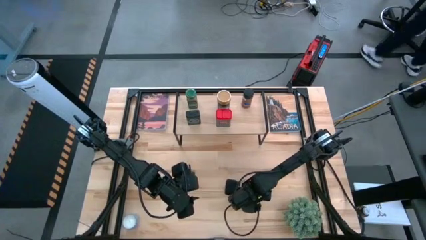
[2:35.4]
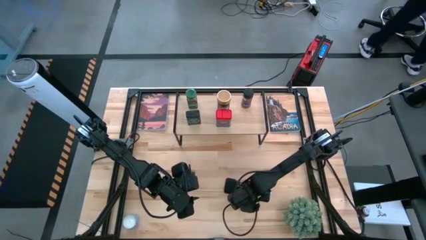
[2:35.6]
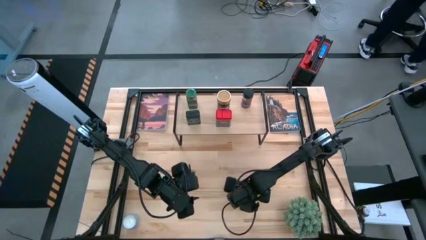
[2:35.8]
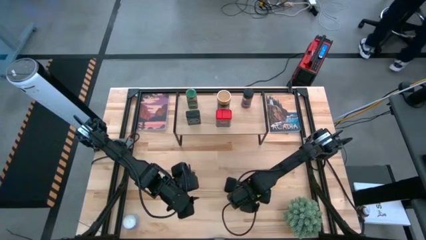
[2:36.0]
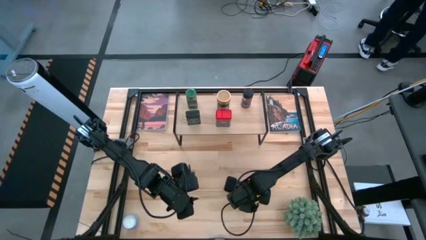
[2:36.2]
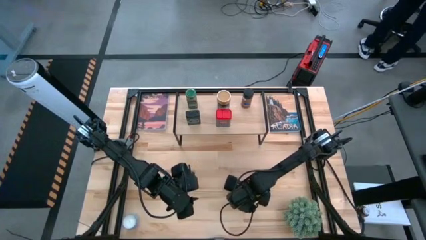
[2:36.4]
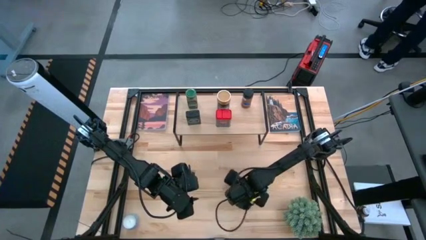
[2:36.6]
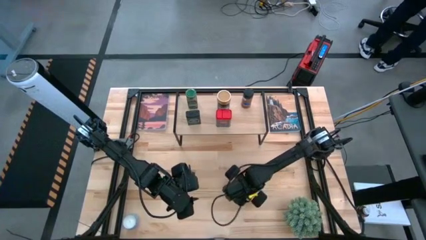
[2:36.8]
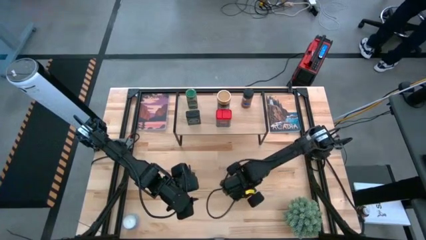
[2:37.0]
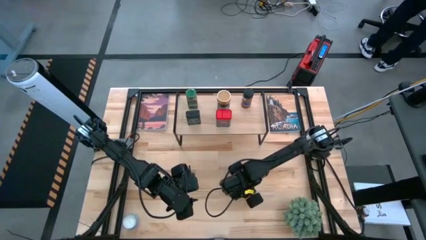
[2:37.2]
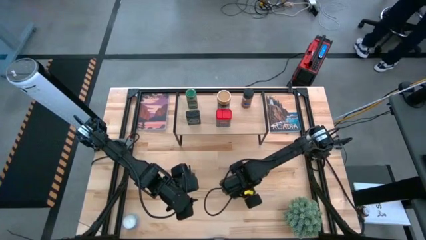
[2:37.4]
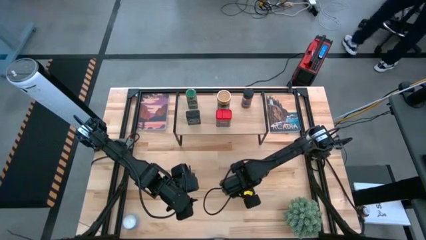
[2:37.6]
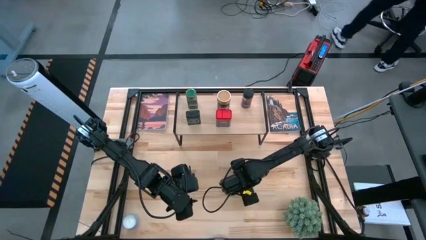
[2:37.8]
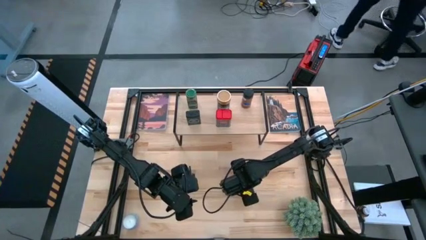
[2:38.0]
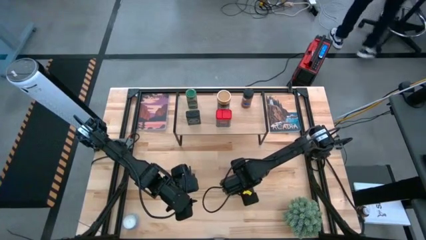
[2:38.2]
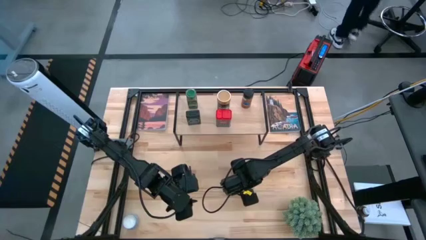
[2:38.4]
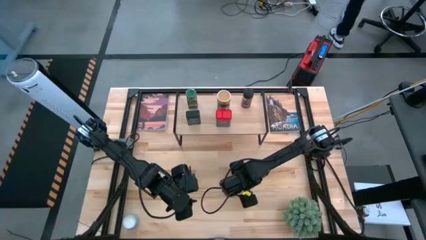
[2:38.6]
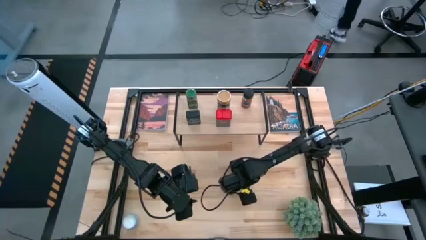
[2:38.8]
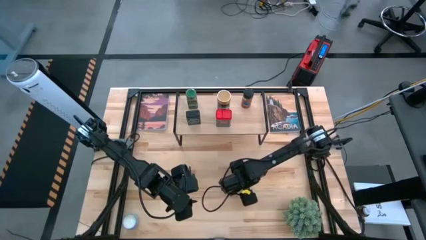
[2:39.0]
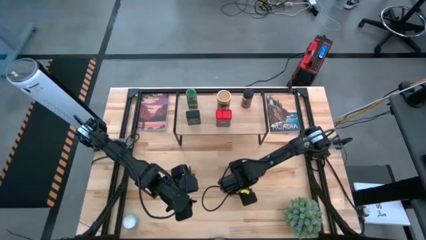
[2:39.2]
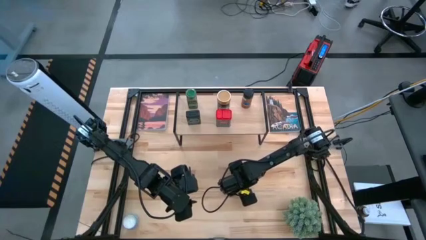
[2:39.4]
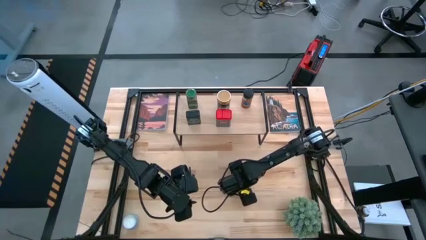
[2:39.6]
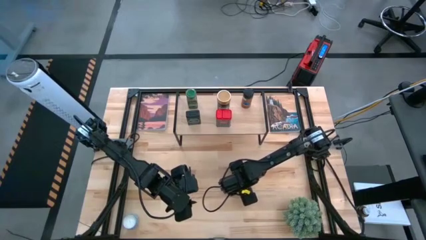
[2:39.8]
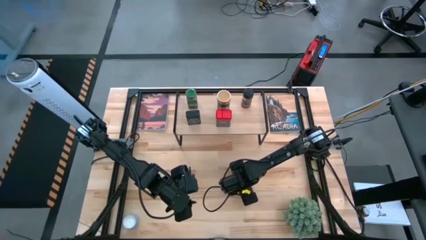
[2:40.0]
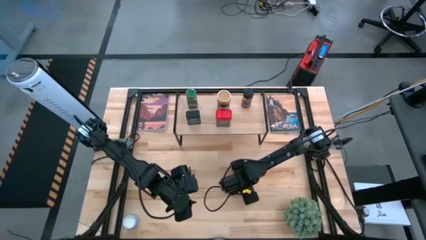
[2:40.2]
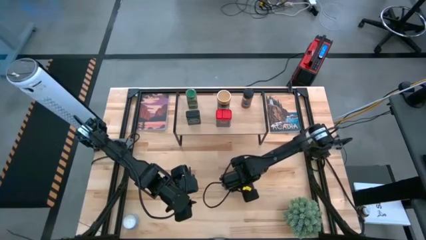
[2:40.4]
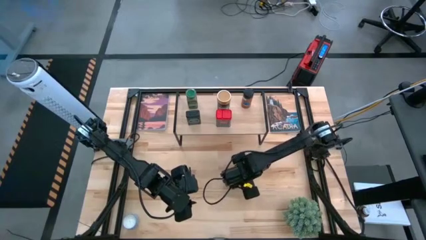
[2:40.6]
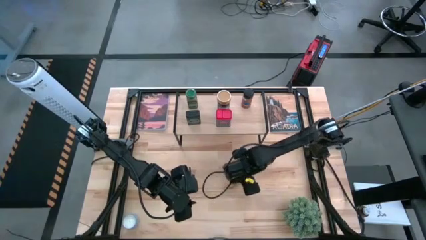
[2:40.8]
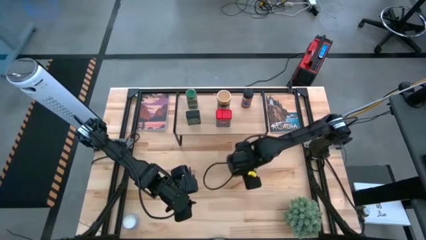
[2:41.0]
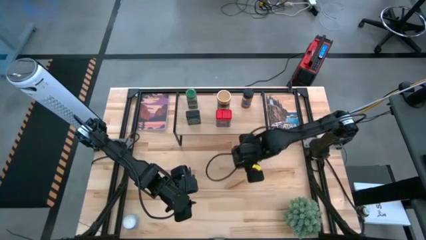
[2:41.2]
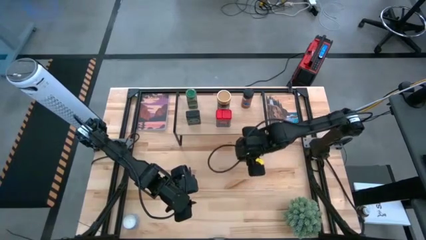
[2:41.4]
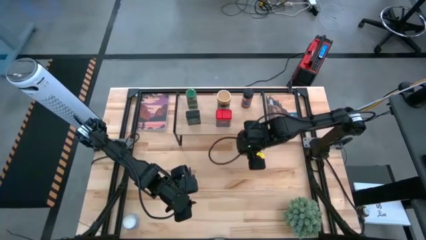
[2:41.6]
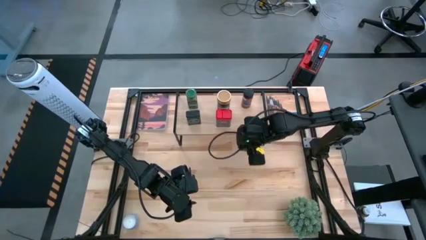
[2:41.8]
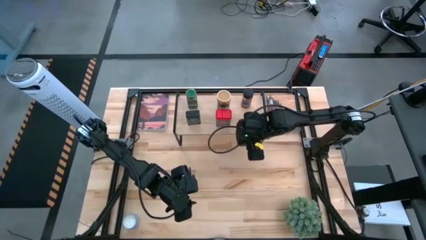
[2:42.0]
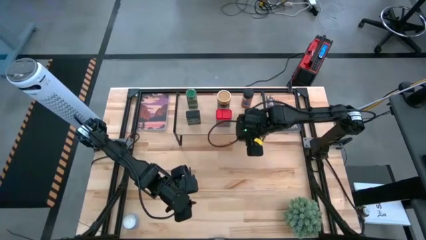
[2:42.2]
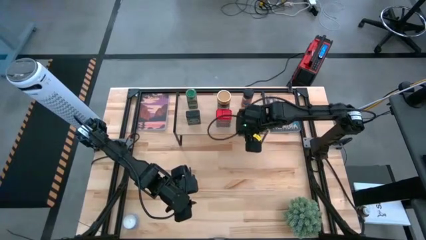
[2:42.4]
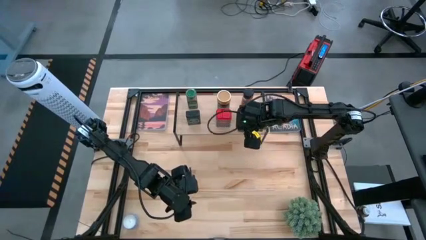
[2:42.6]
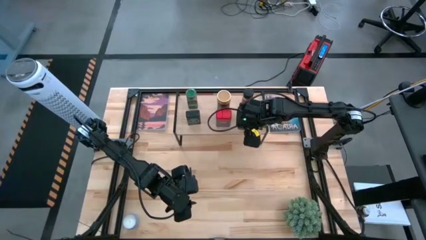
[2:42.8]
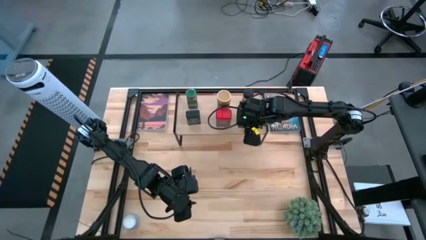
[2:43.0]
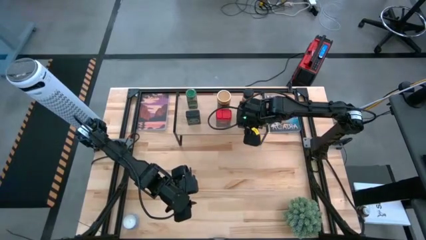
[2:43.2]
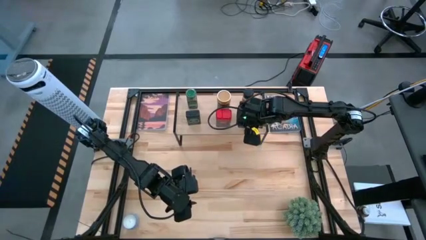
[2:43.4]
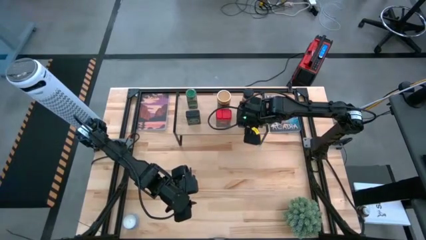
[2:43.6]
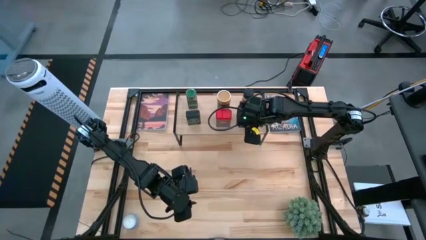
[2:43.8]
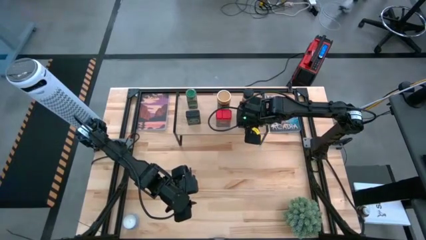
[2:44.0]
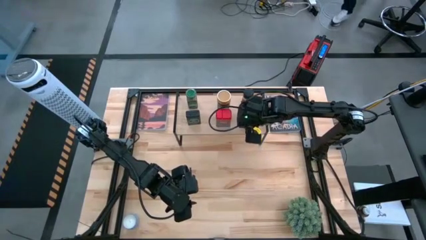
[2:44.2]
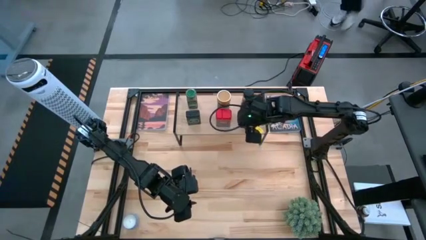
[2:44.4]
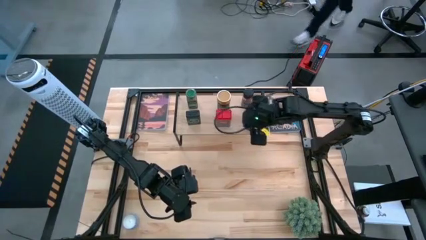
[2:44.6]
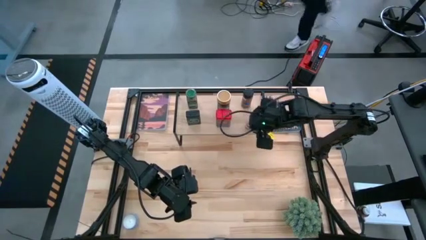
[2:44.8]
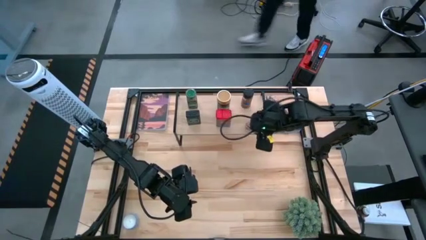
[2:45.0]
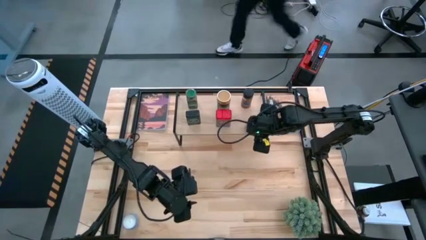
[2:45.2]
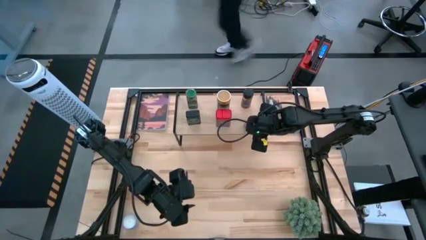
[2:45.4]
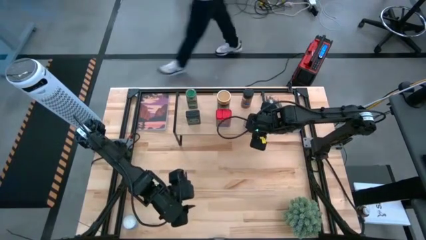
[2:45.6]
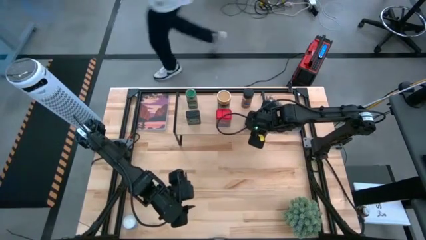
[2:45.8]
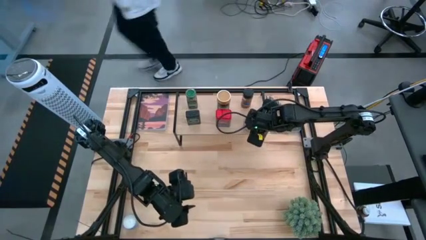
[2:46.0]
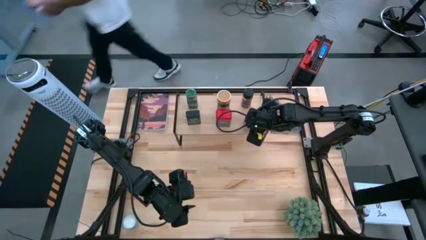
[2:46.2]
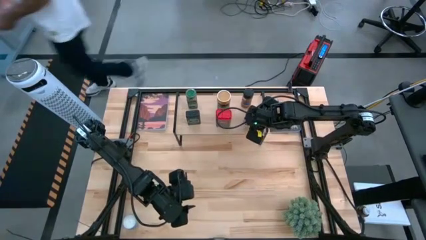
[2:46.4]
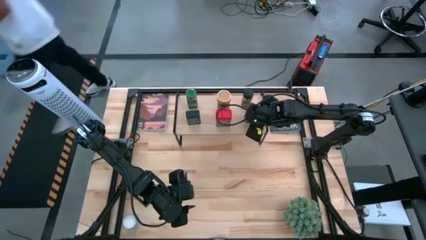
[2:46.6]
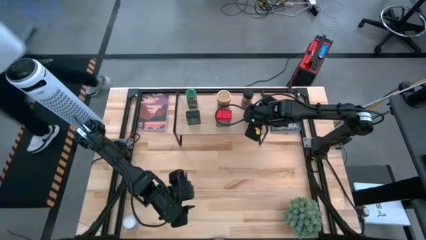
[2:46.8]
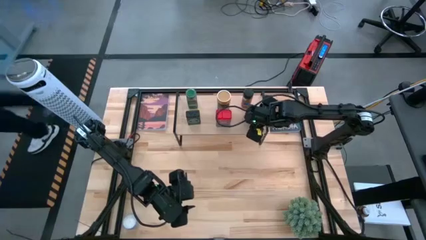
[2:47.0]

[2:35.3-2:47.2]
Task: Shelf spices
Put the brown seasoning bottle on the shelf

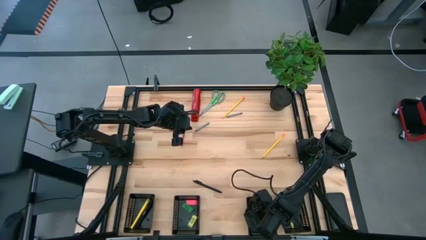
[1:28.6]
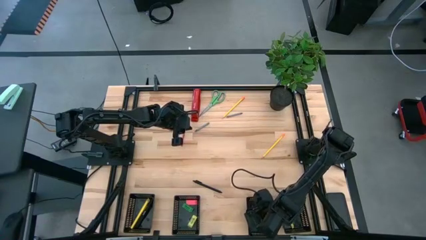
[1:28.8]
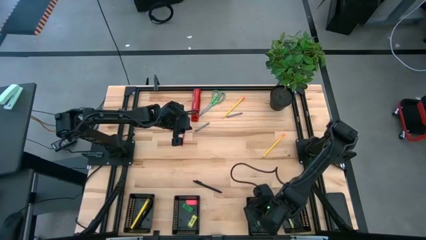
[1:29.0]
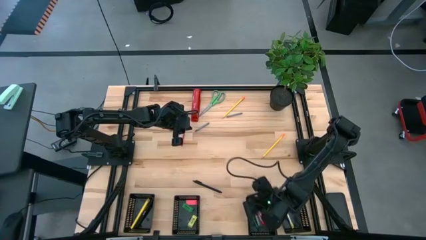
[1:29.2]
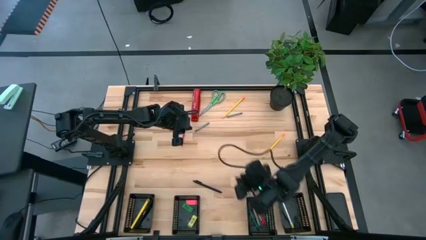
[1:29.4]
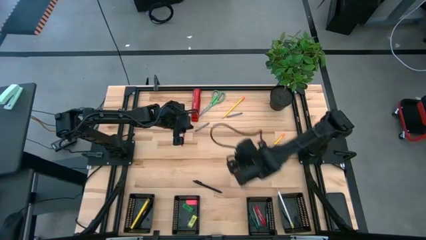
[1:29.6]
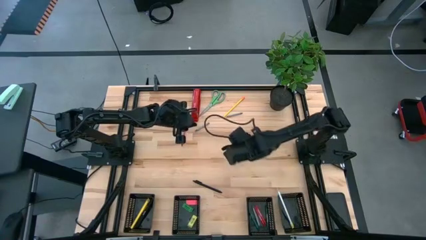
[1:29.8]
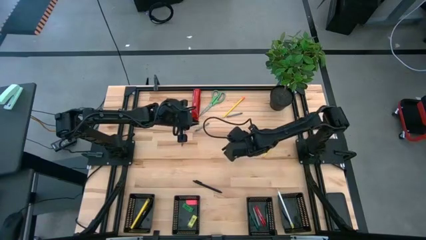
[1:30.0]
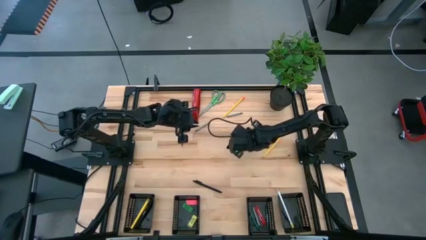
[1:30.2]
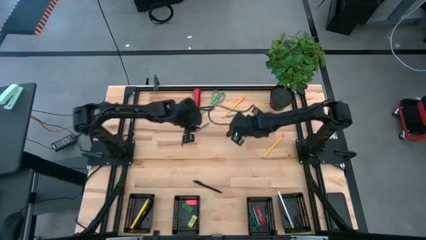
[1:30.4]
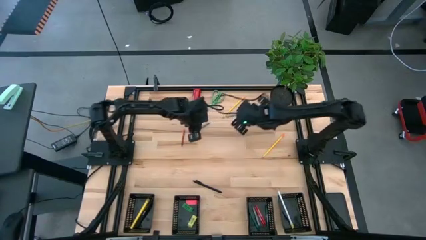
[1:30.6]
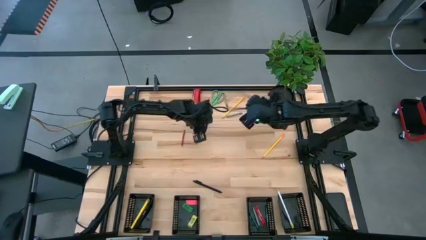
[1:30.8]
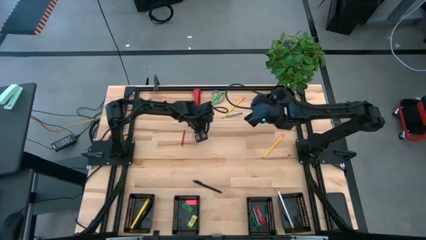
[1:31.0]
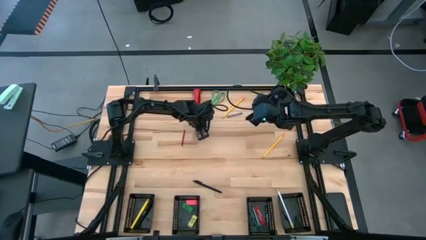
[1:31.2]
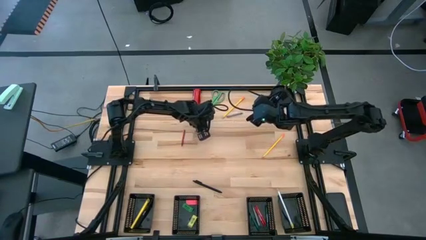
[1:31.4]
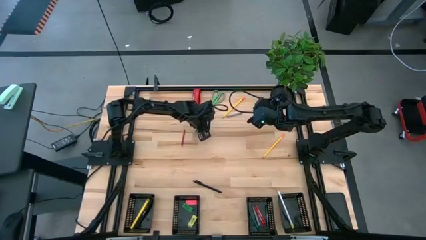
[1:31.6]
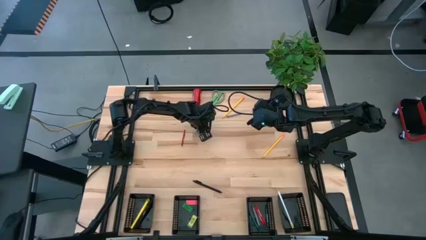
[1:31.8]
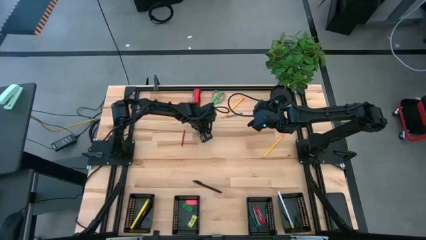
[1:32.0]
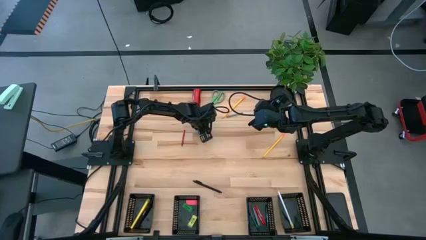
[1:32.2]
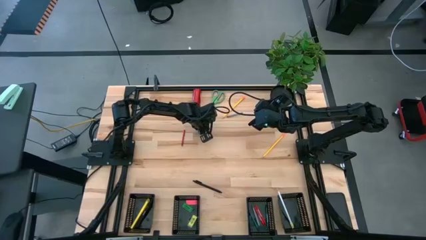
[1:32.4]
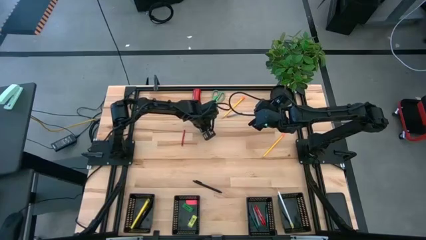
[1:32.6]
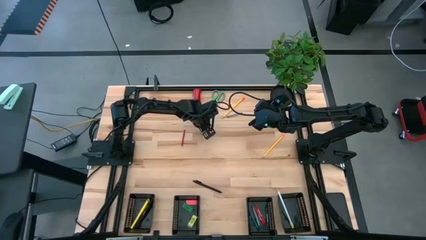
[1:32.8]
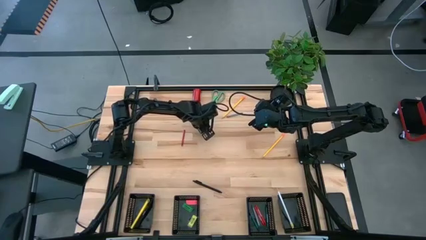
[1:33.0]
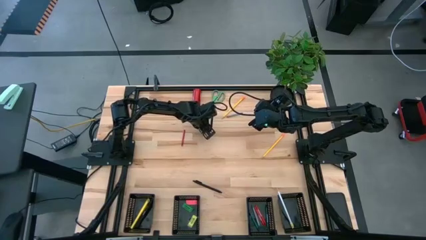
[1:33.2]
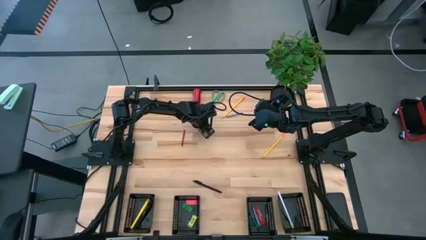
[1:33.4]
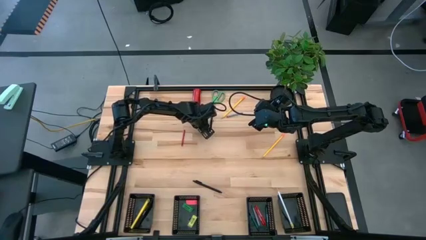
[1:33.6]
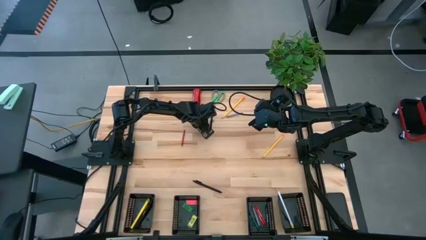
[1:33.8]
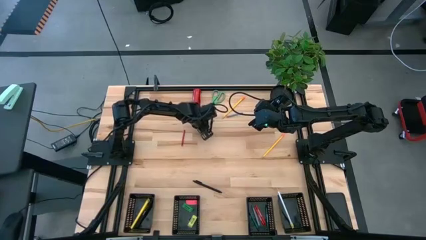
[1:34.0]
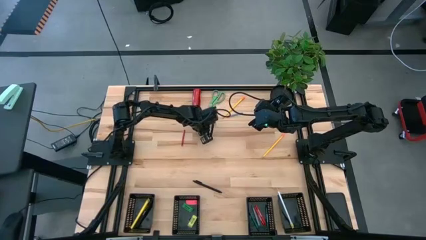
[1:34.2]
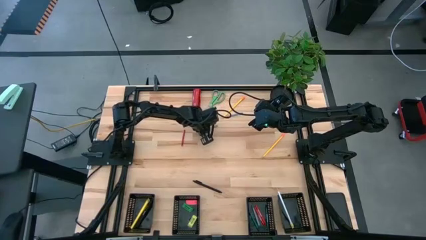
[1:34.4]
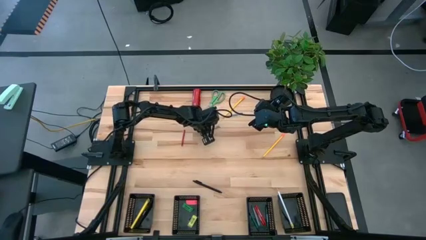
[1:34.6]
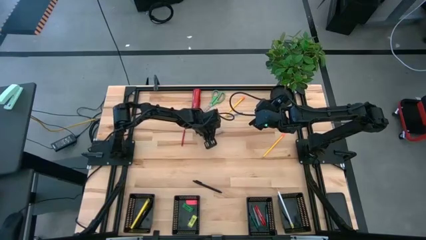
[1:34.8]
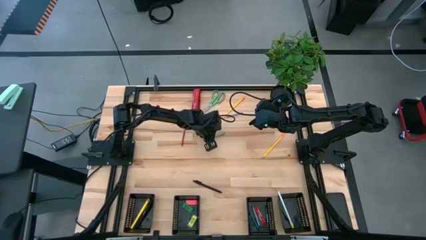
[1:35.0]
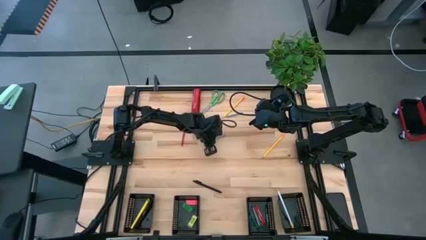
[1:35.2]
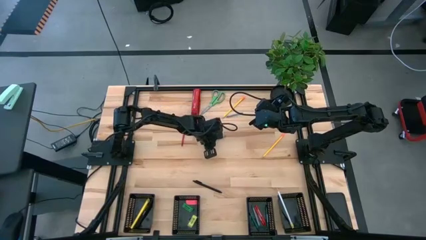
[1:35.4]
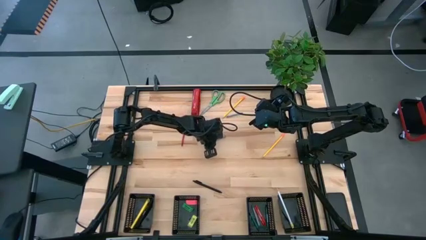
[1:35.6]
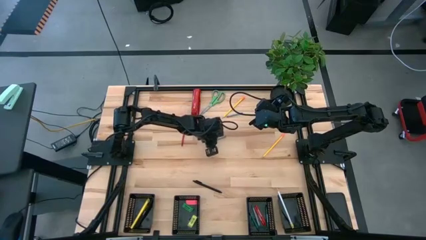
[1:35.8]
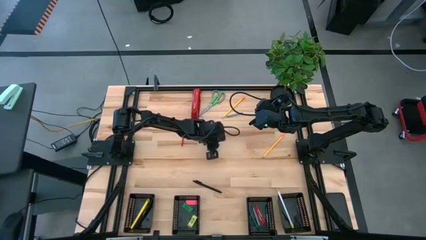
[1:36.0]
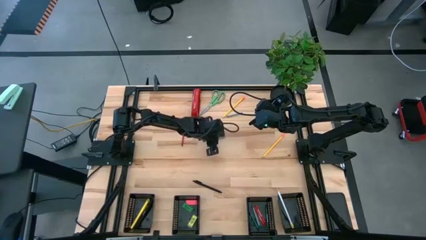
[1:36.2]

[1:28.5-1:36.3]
Task: Sort crayons/erasers/pens/pencils in bins
Put the left gray crayon into the middle right black bin
